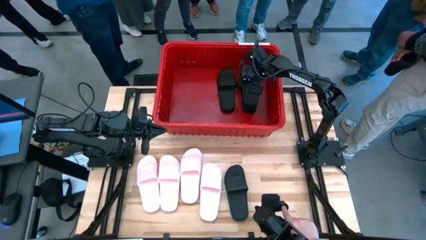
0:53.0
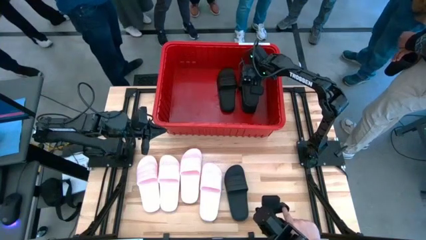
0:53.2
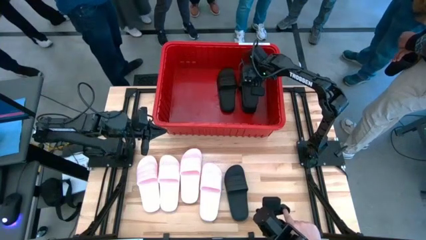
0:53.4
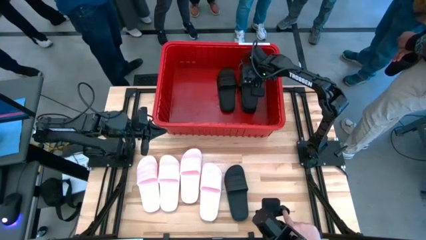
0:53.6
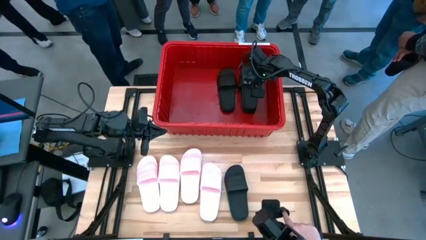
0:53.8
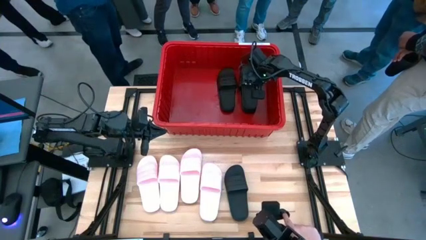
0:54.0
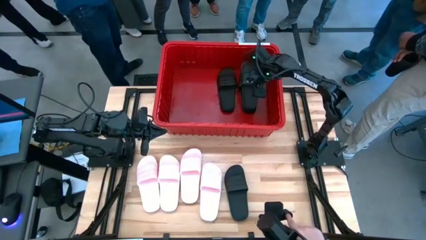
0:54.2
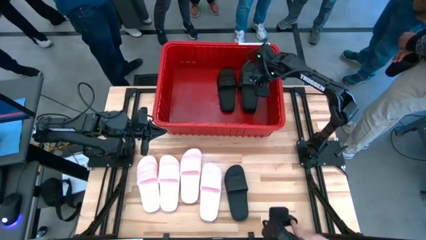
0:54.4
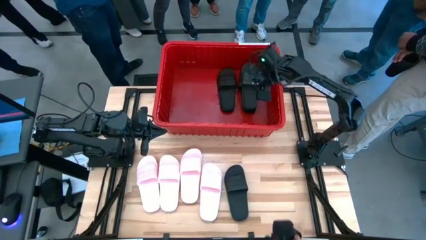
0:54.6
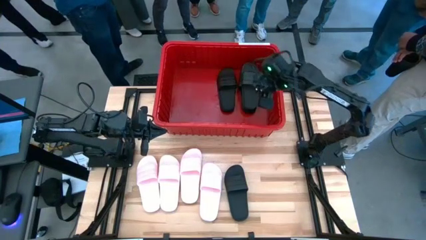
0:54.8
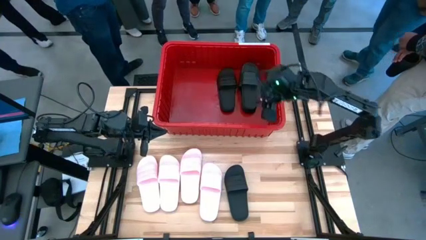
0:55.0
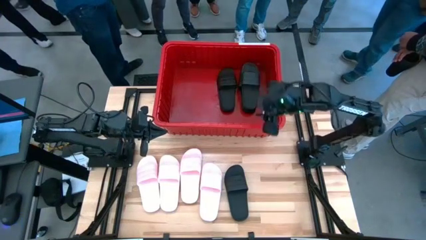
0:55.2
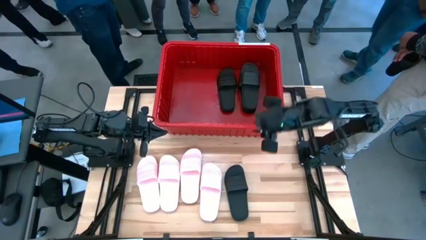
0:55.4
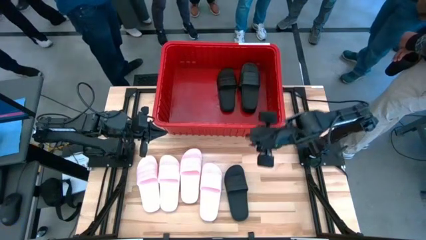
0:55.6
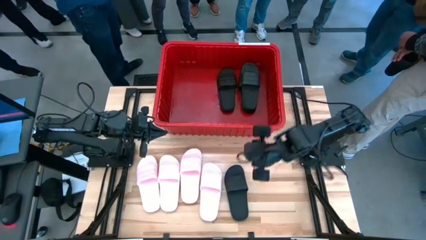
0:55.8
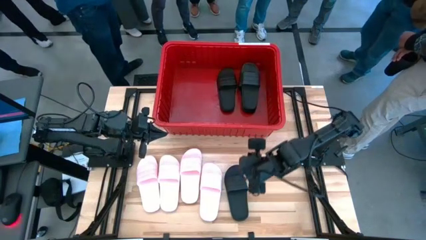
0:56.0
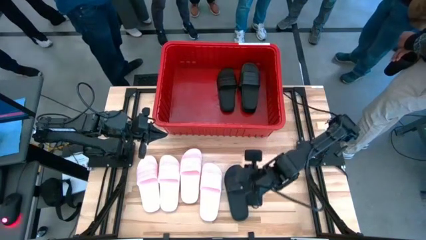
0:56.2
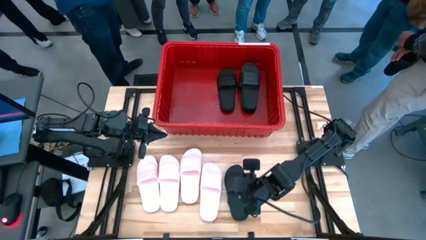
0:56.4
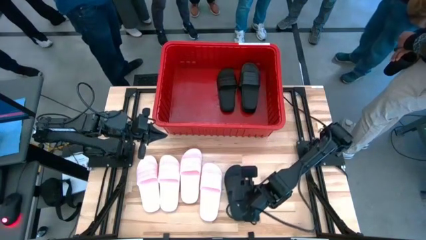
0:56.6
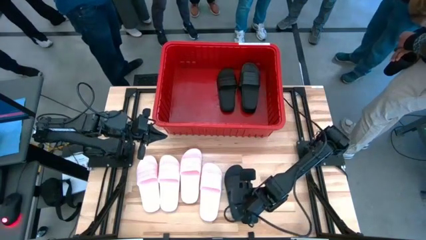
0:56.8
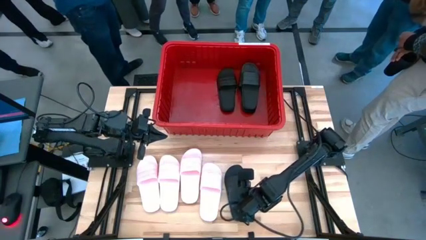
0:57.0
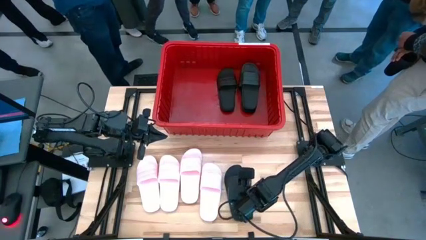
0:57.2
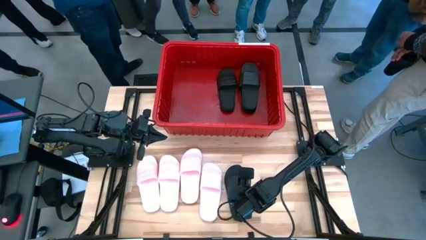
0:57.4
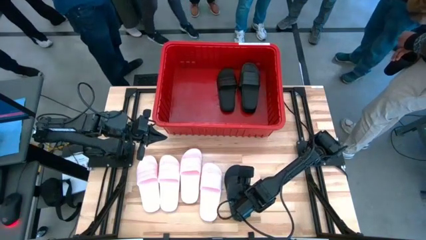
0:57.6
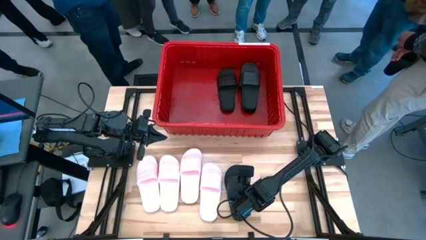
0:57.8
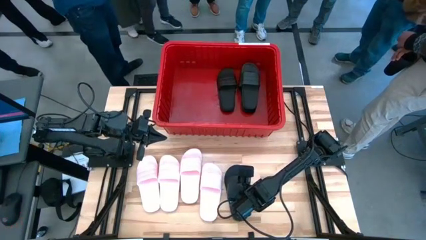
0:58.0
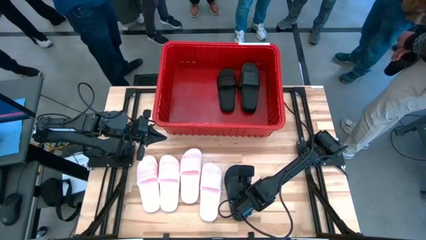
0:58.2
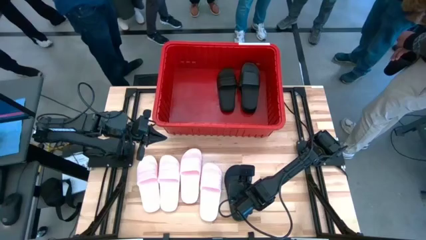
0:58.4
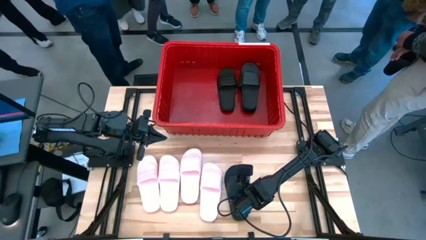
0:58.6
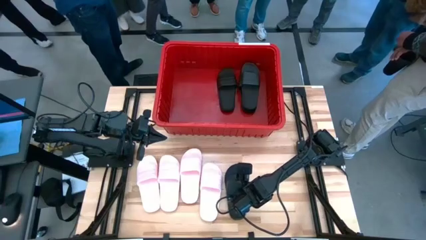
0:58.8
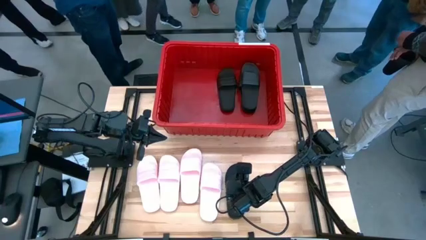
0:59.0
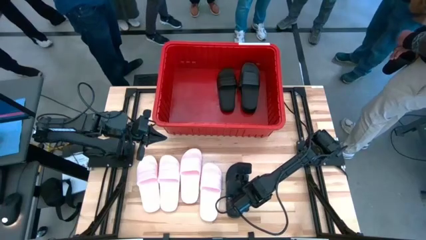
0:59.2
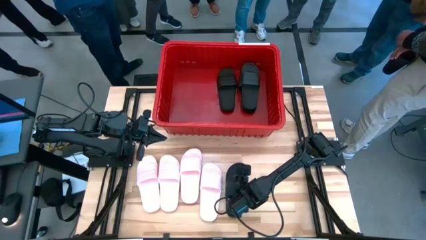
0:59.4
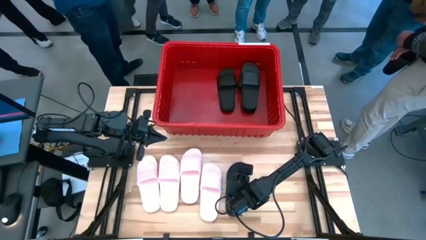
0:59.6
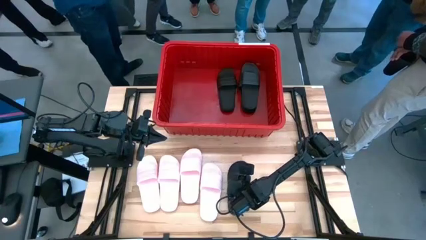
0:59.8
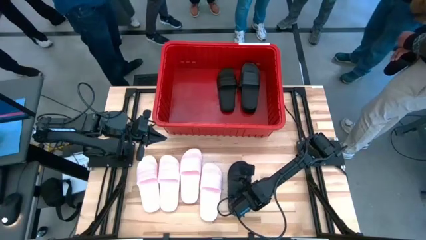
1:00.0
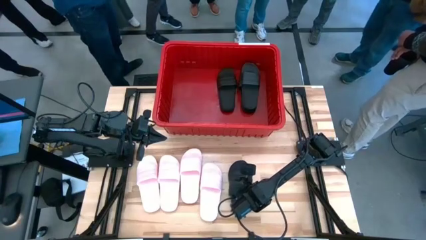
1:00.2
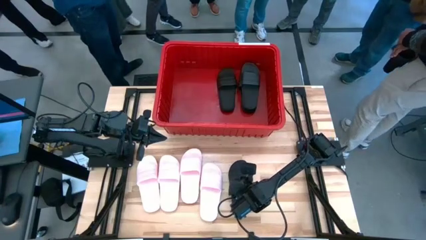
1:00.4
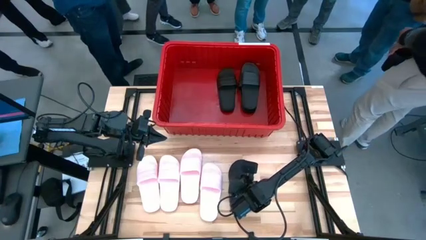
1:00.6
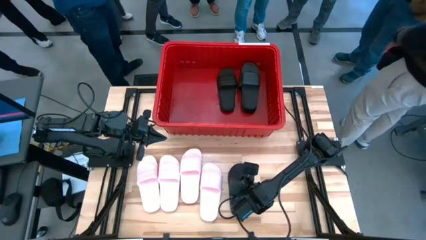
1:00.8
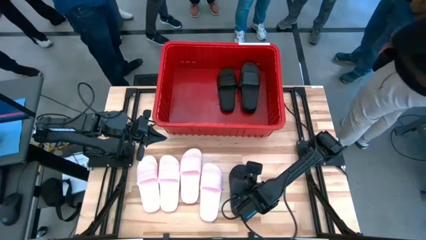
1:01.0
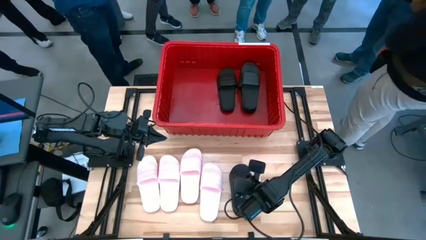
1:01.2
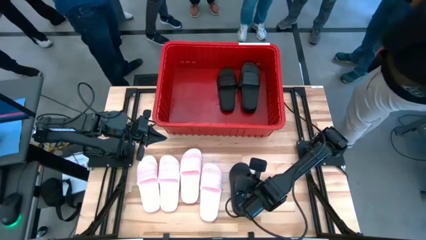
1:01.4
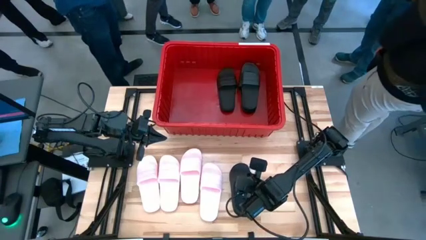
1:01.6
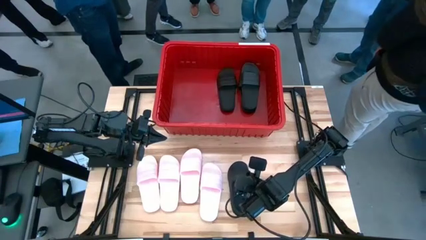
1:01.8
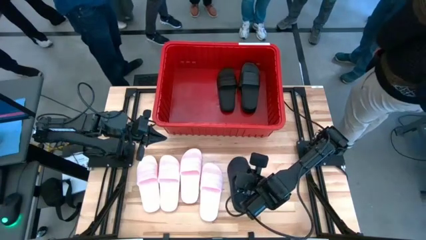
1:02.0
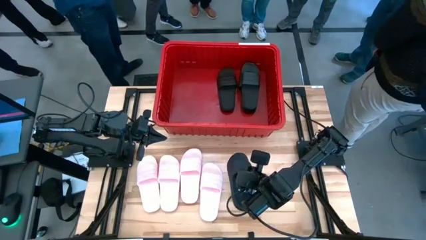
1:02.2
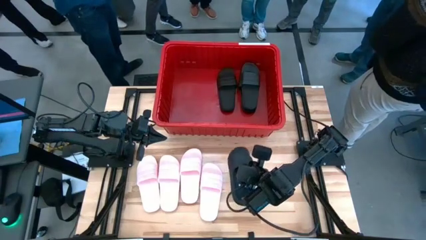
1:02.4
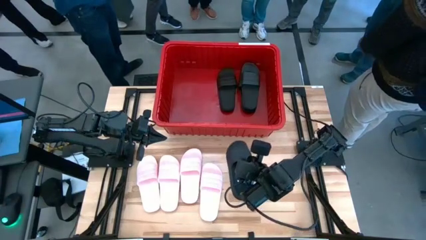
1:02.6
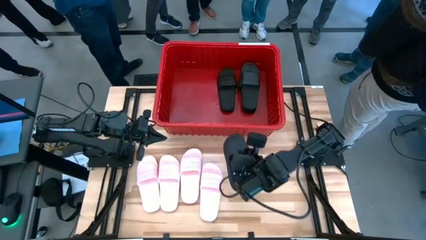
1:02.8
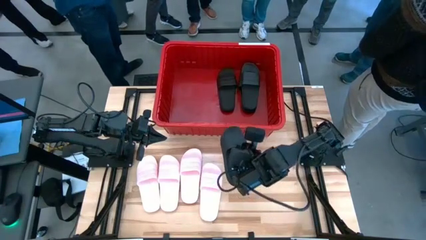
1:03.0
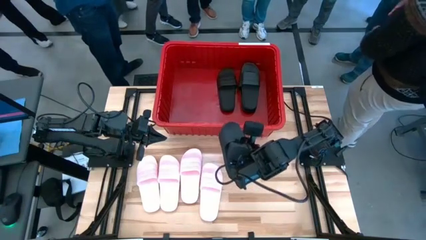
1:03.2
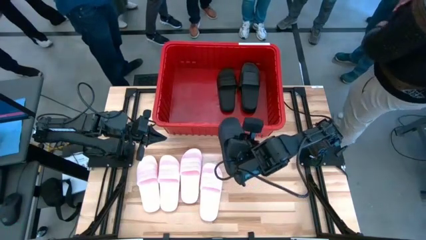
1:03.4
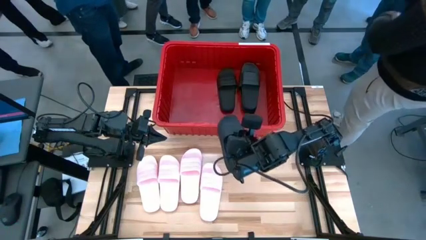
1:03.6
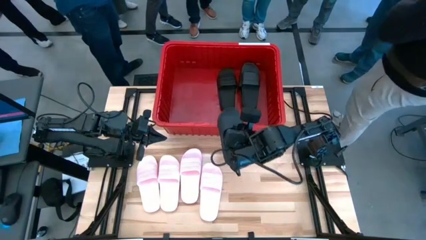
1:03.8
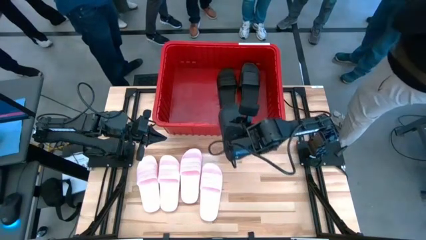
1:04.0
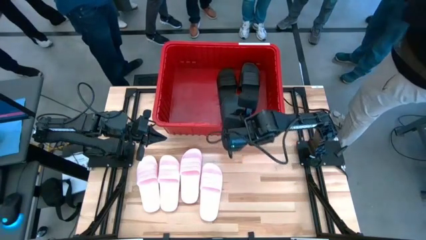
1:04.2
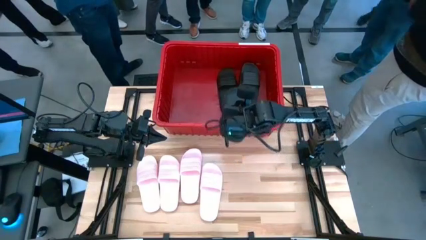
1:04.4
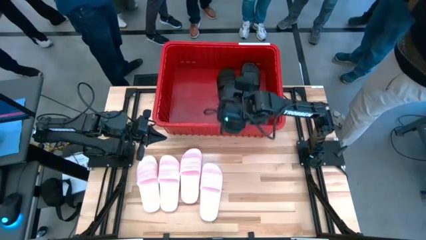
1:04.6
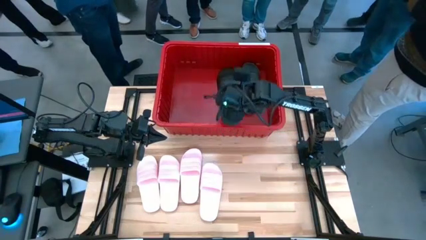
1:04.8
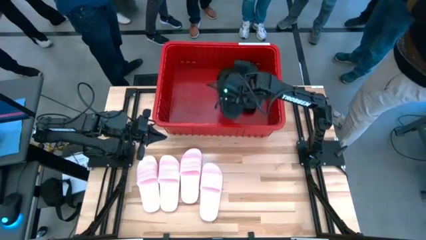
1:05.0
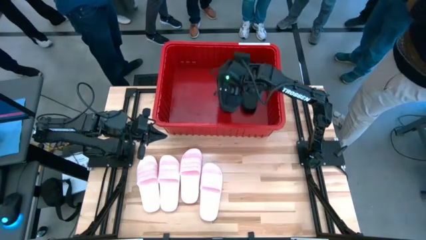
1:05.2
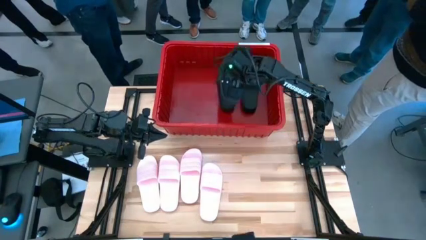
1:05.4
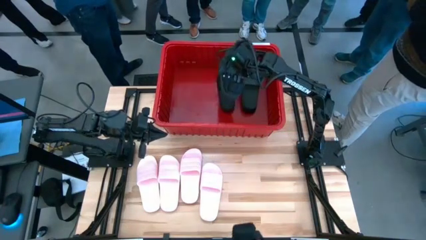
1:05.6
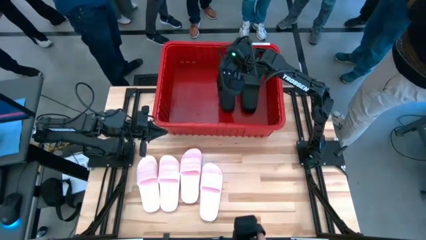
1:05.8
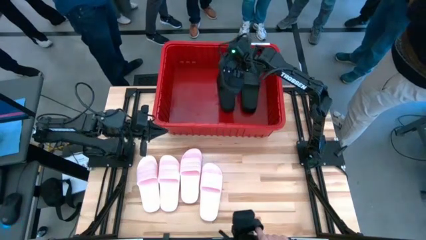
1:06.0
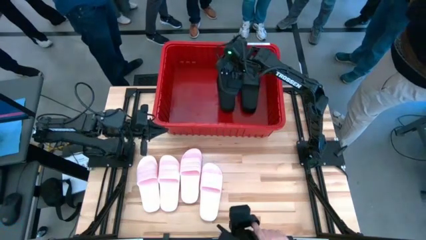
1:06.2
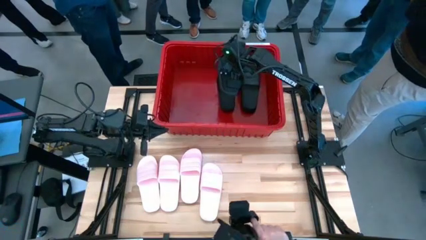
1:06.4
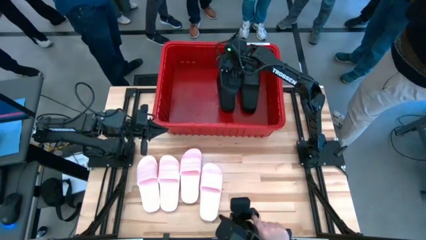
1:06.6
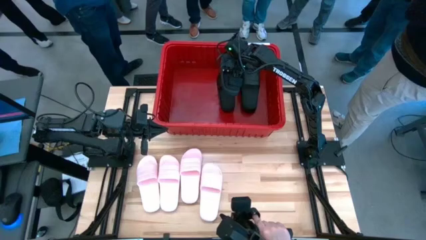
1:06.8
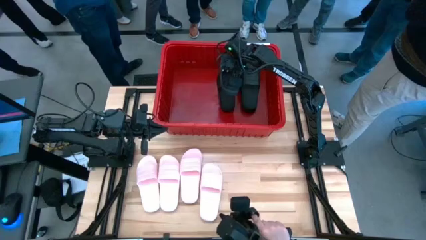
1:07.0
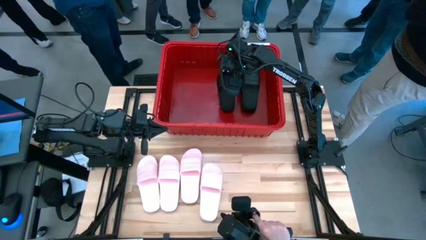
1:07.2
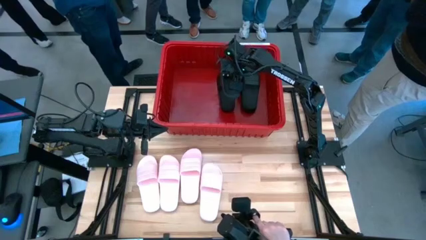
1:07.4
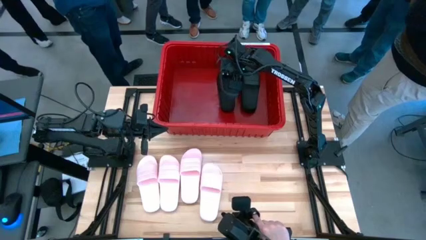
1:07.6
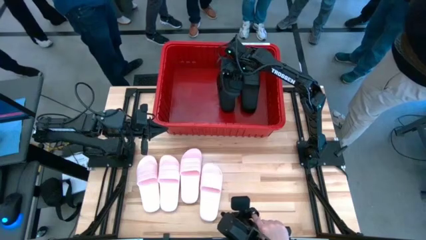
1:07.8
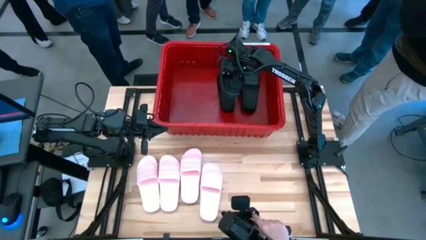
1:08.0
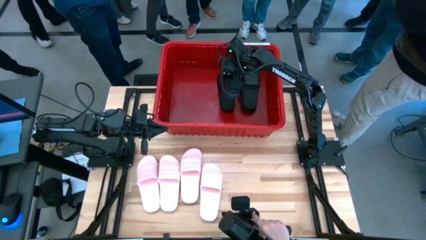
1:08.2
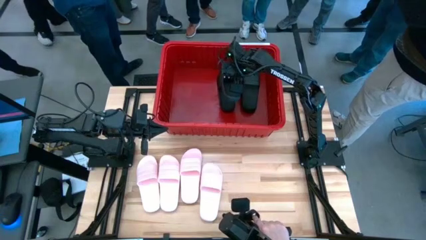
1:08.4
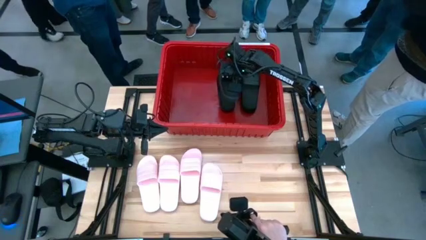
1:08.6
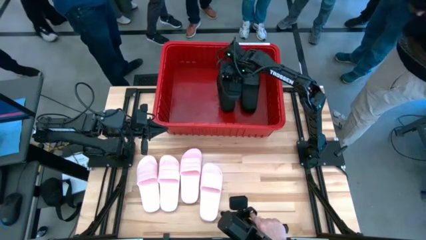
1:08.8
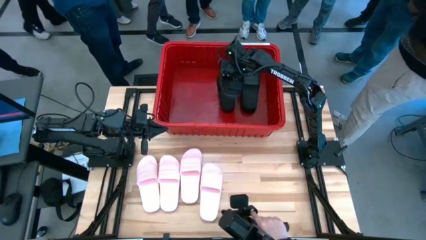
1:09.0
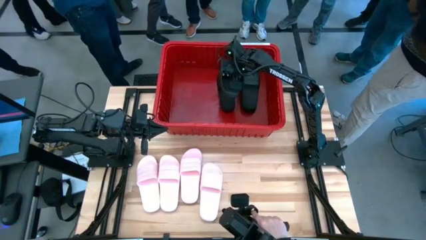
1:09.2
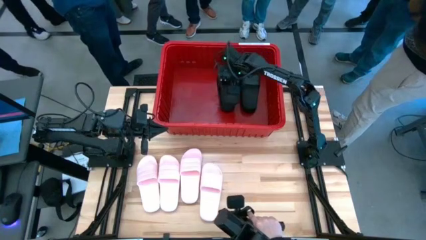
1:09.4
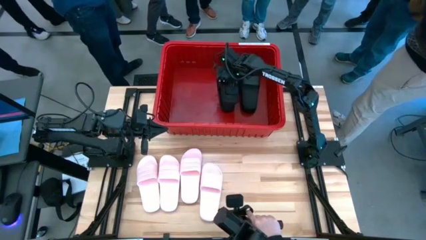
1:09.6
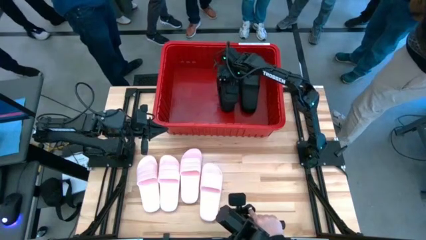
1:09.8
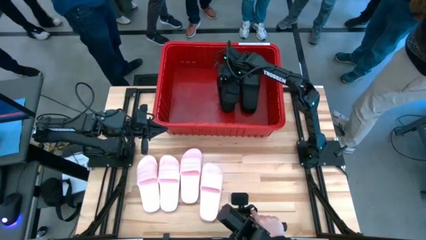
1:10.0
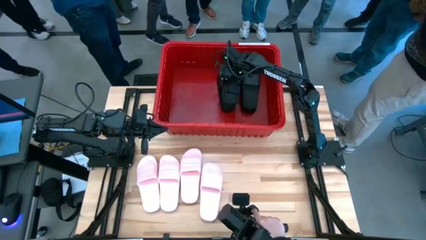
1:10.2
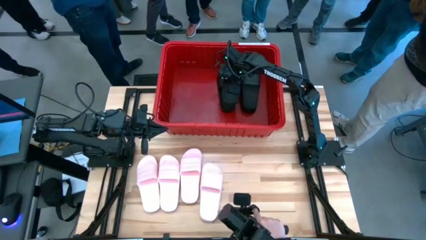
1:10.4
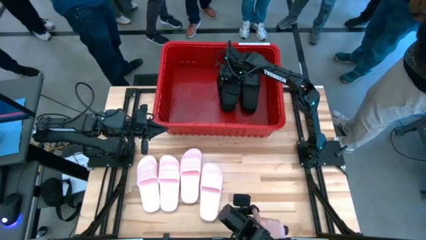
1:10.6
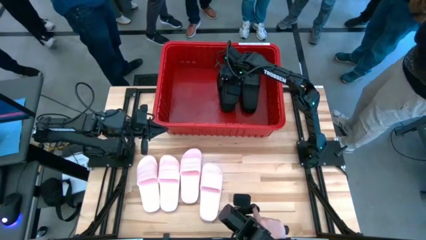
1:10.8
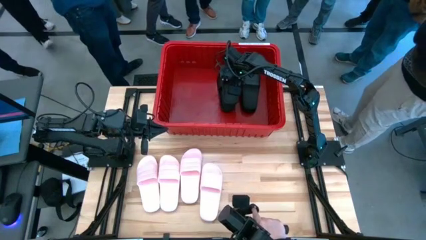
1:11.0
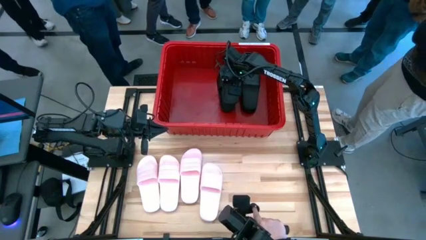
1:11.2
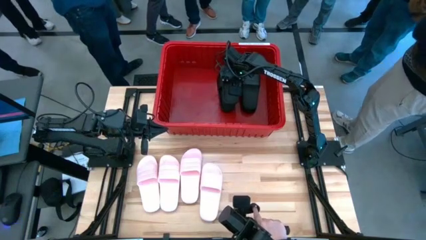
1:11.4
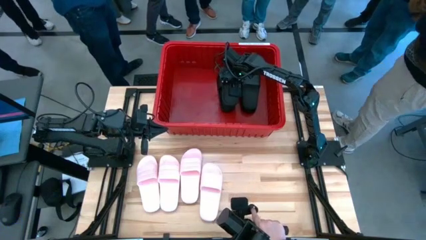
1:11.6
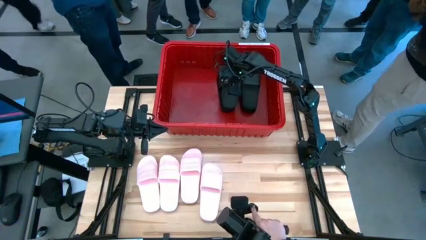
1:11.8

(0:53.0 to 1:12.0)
Task: Pick and place slides into bin
Put the black slide into the red container
